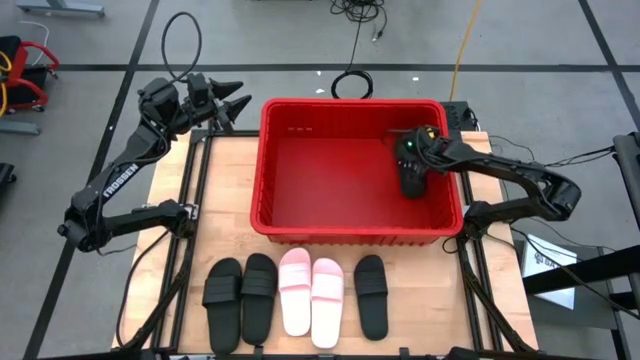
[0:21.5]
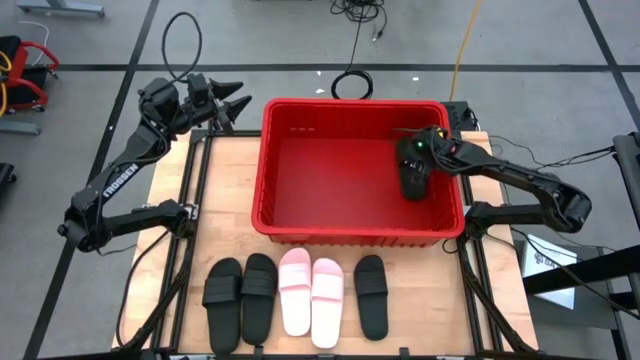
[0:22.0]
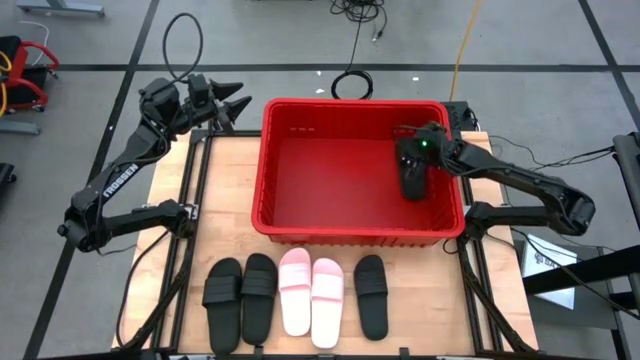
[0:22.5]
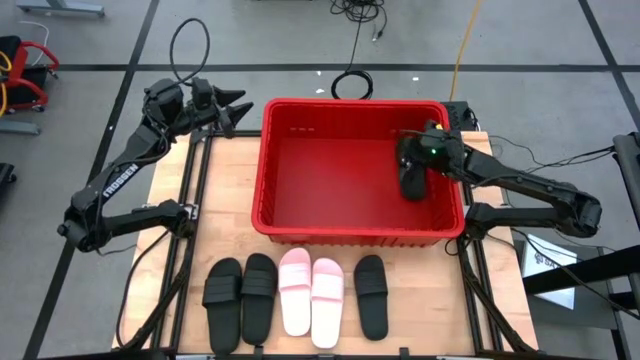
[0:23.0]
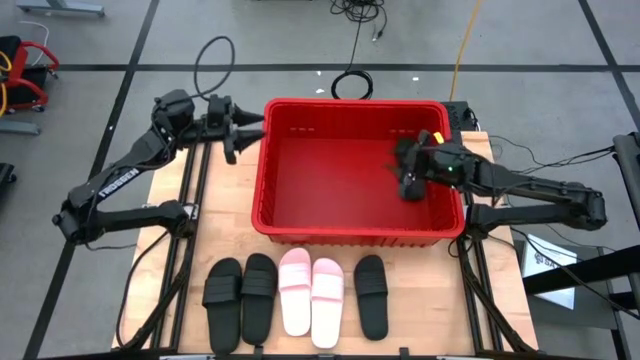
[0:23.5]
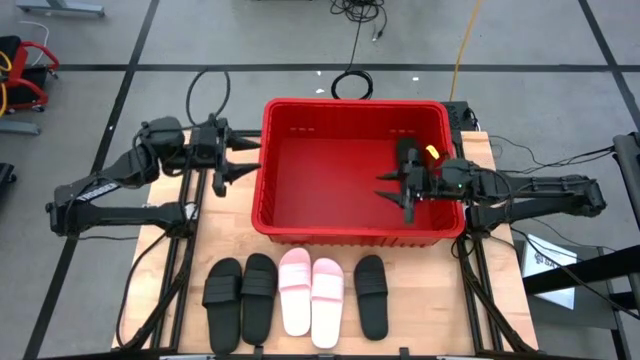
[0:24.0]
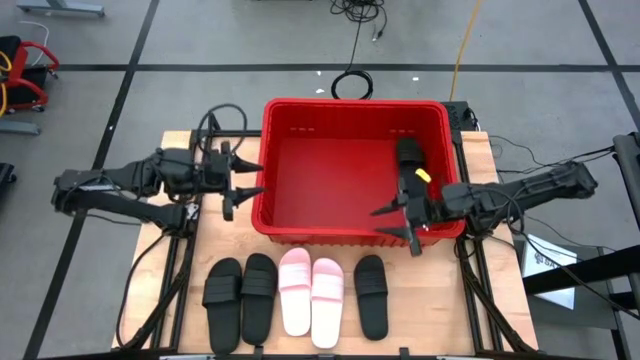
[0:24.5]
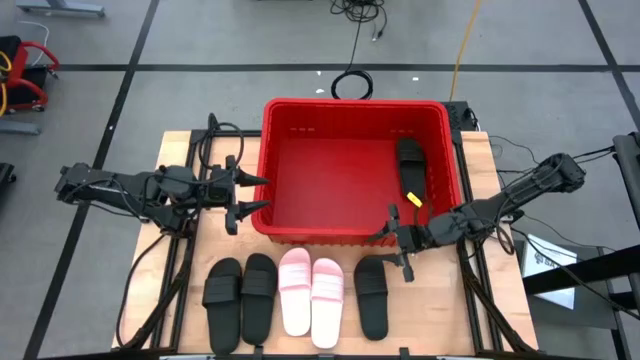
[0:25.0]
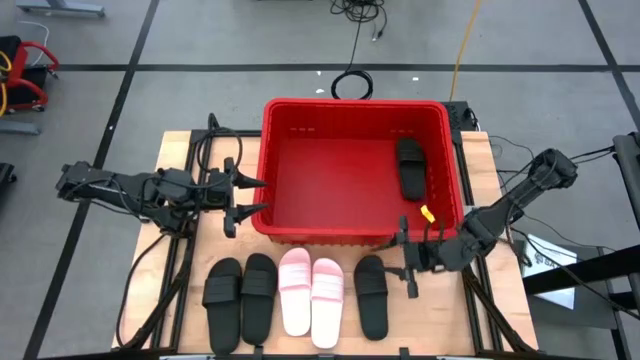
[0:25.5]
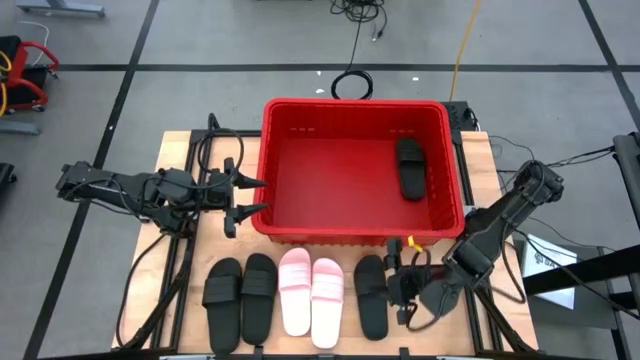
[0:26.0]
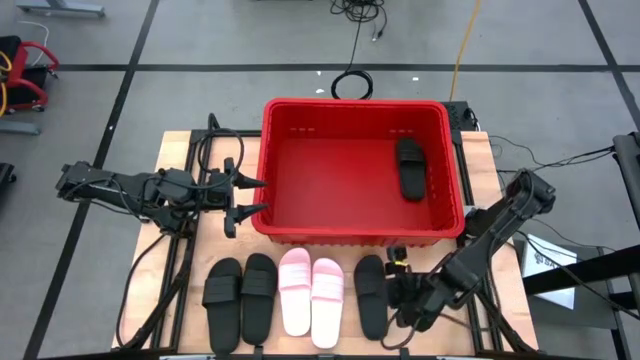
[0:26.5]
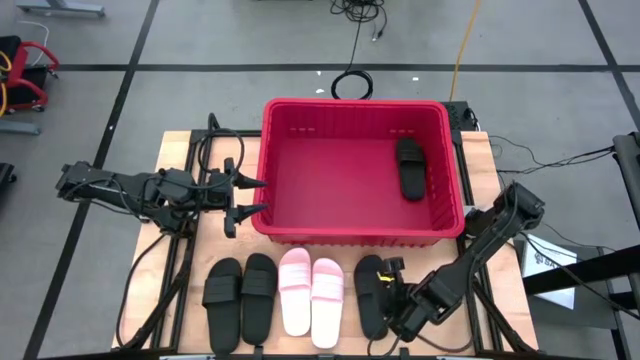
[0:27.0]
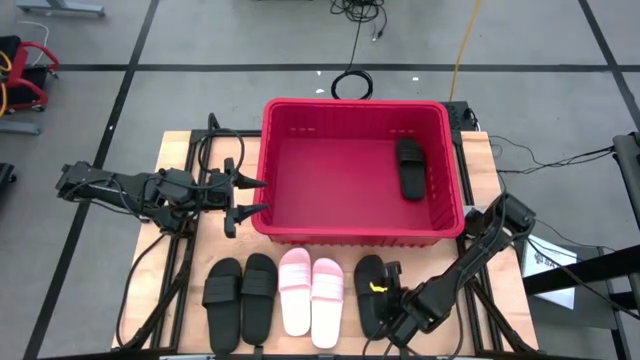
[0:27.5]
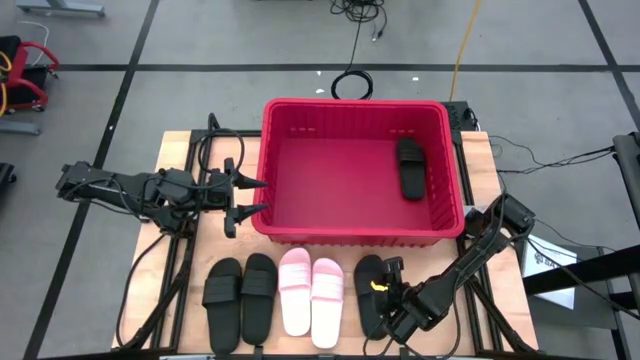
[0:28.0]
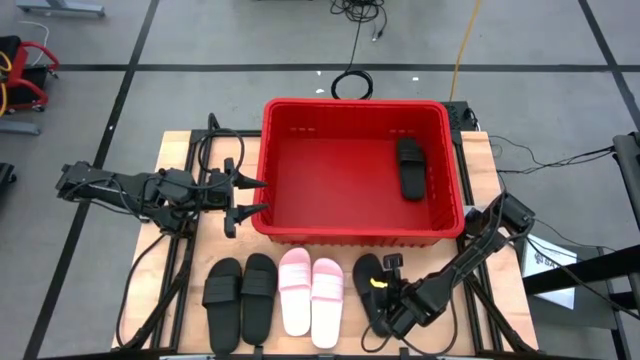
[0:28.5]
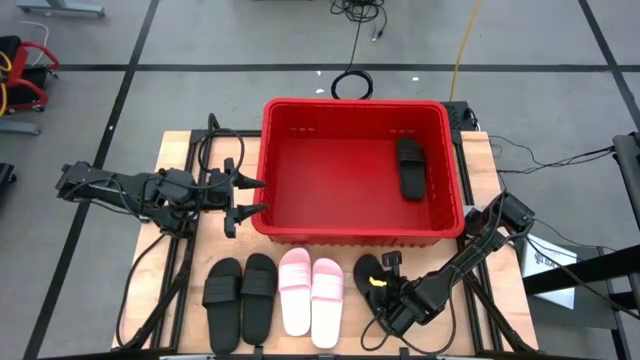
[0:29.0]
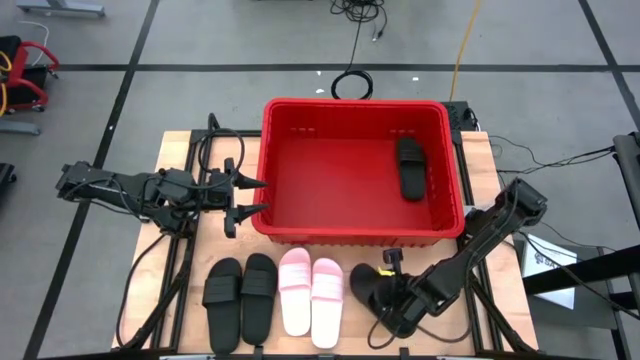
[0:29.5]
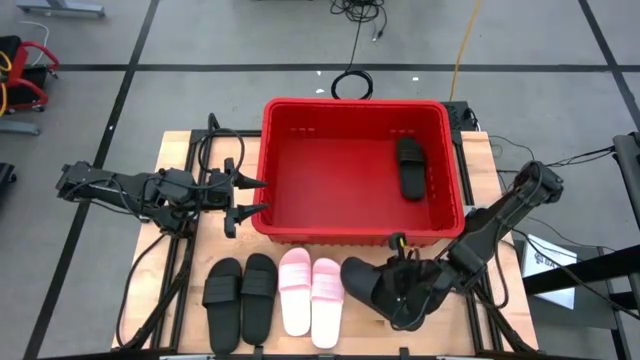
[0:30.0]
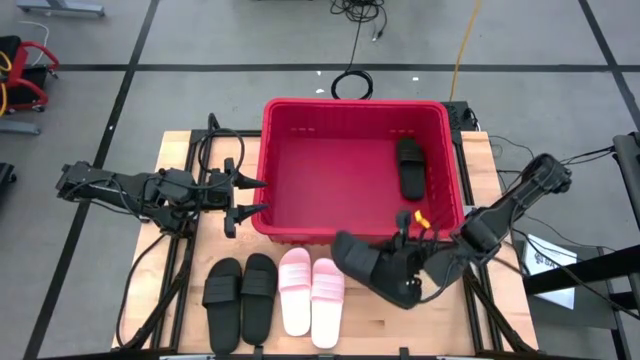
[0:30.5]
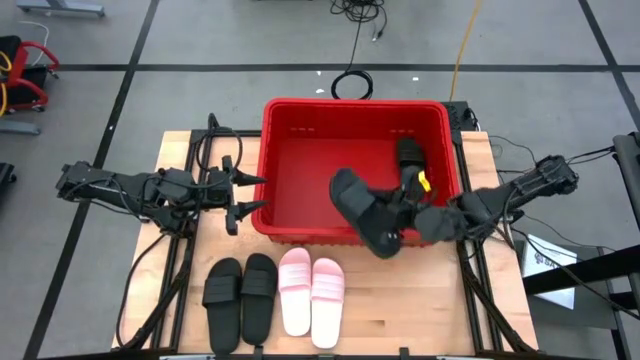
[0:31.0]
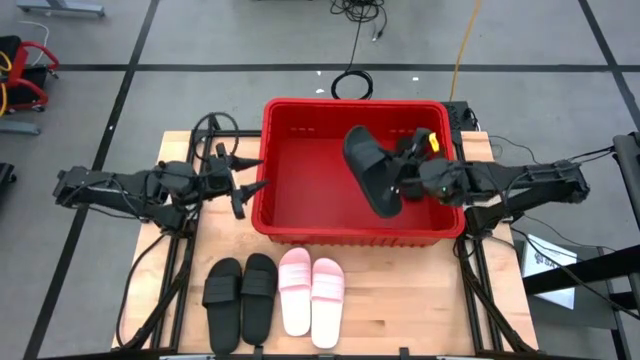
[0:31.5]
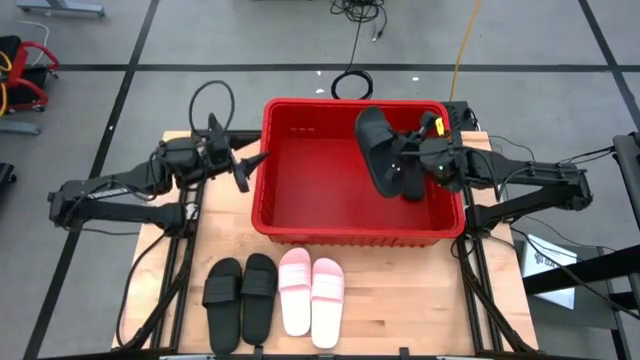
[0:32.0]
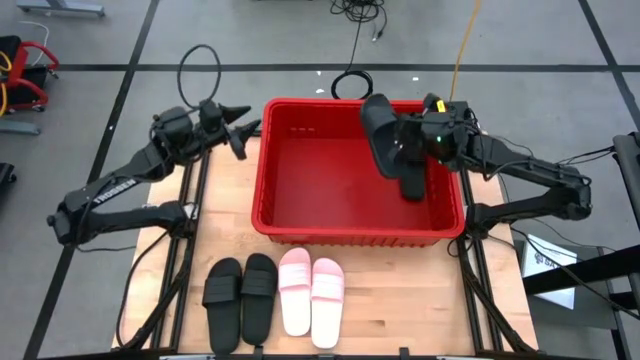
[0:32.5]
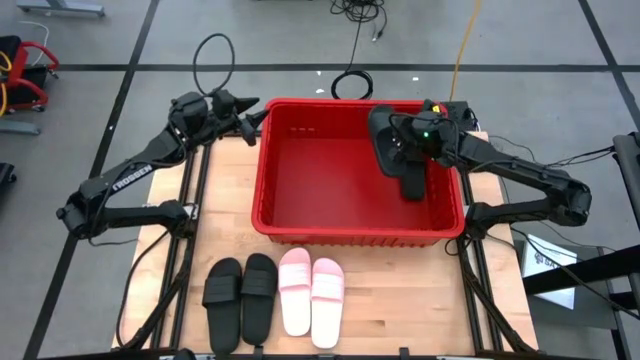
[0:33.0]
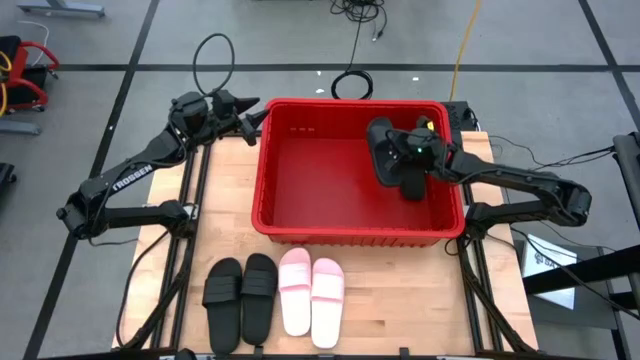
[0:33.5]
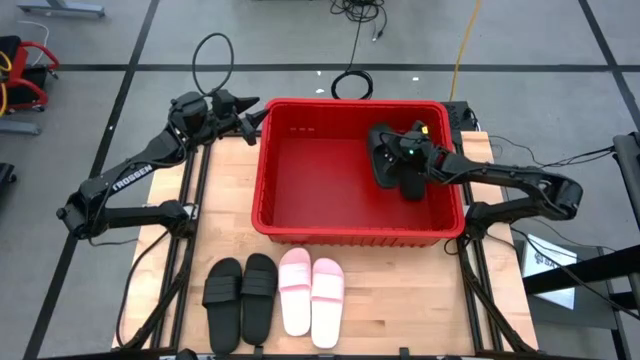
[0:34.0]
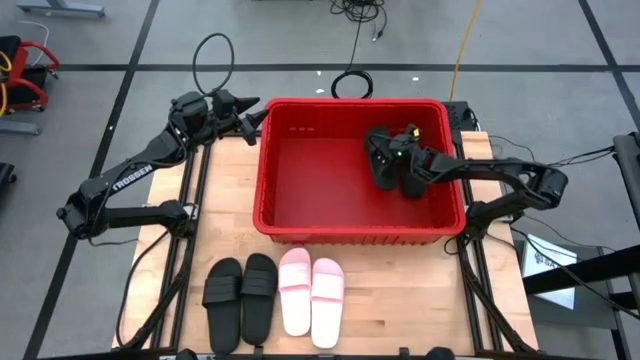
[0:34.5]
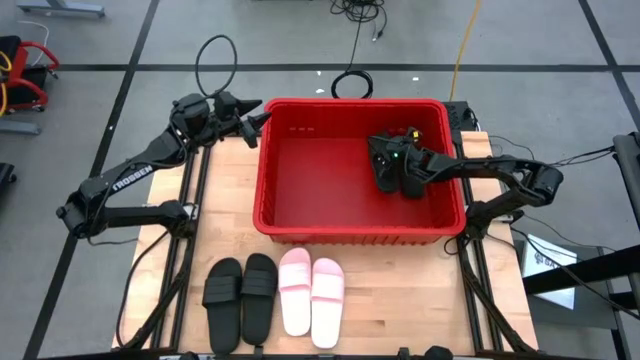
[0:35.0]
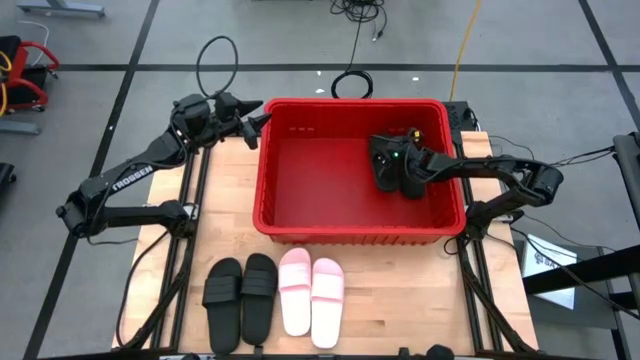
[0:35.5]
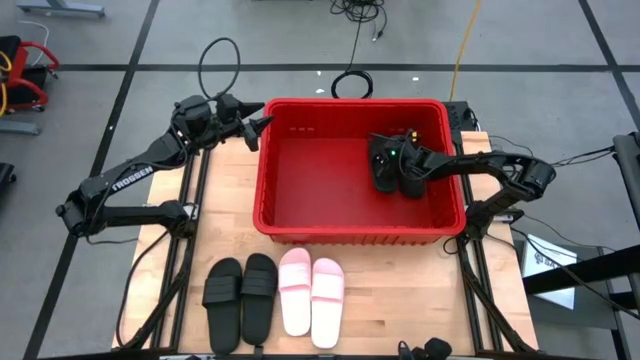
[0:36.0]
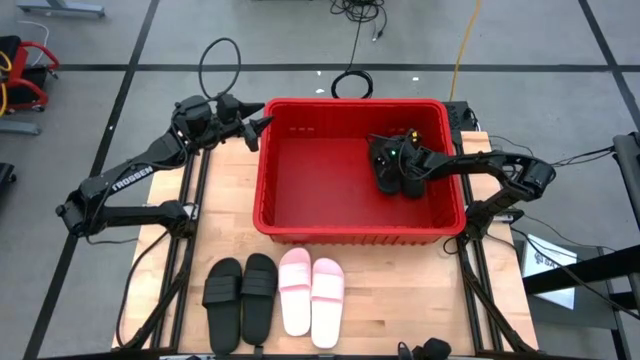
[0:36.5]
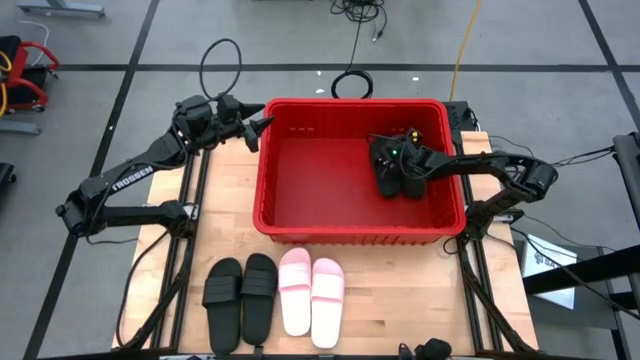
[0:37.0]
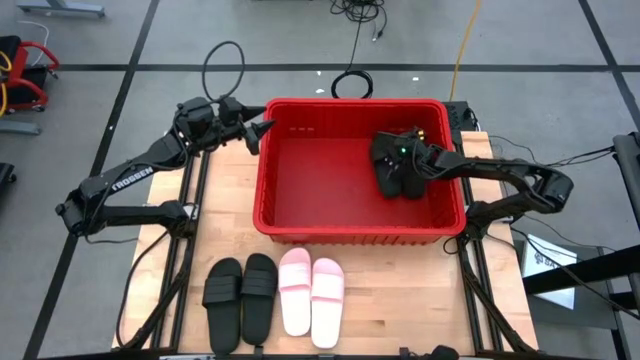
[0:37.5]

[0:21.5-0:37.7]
Task: Pick and place slides into bin
Put the black slide into the red bin

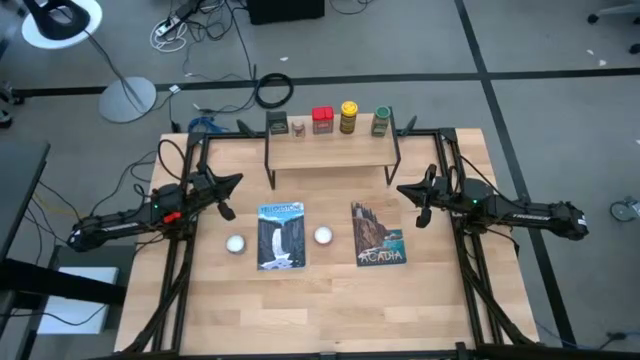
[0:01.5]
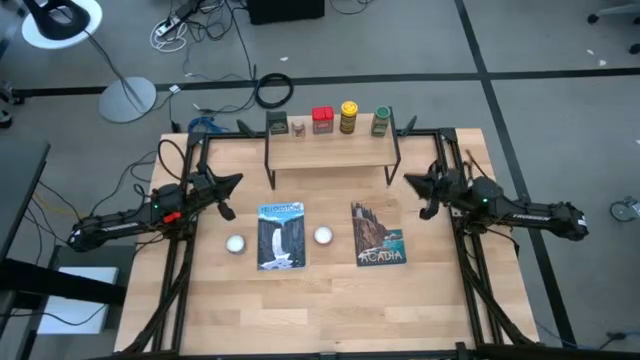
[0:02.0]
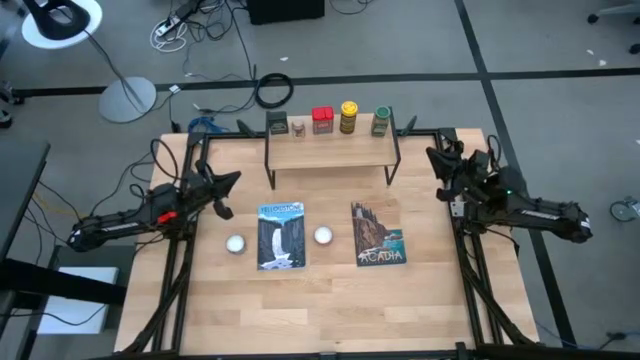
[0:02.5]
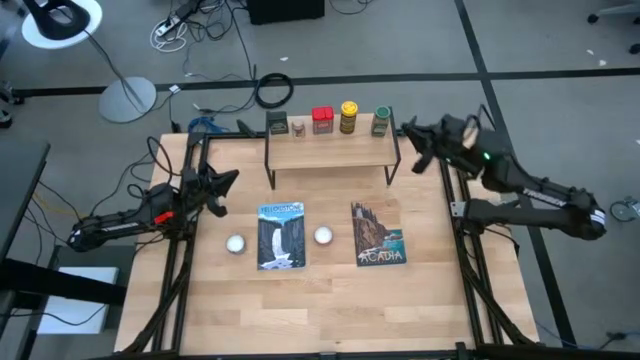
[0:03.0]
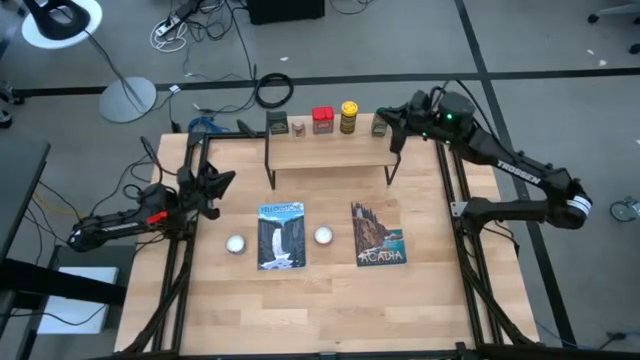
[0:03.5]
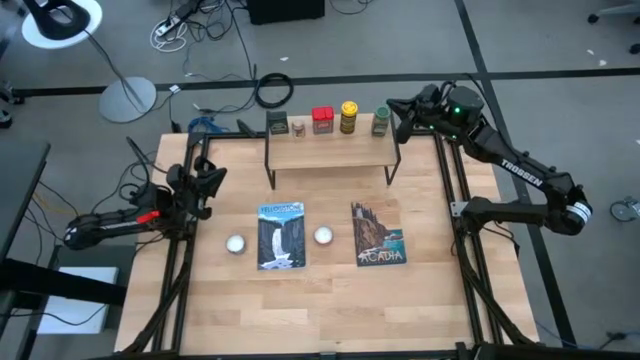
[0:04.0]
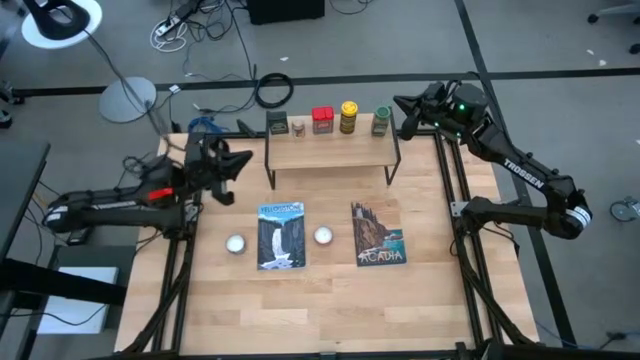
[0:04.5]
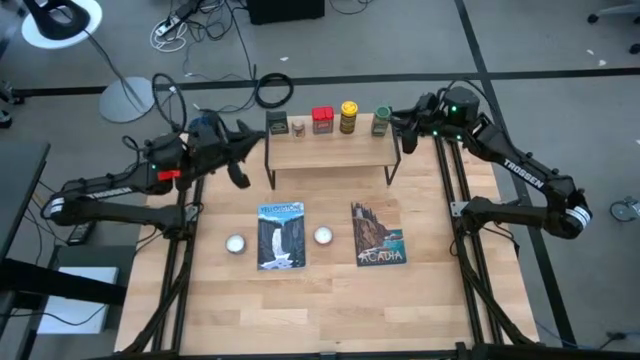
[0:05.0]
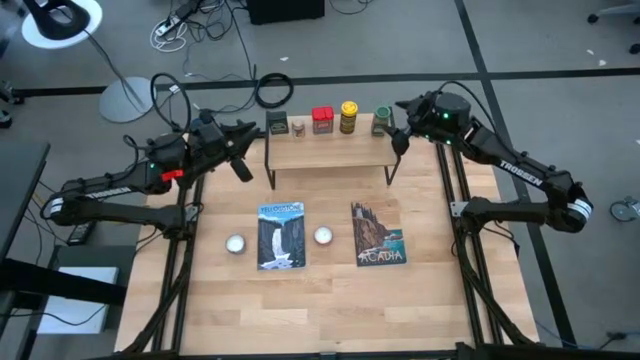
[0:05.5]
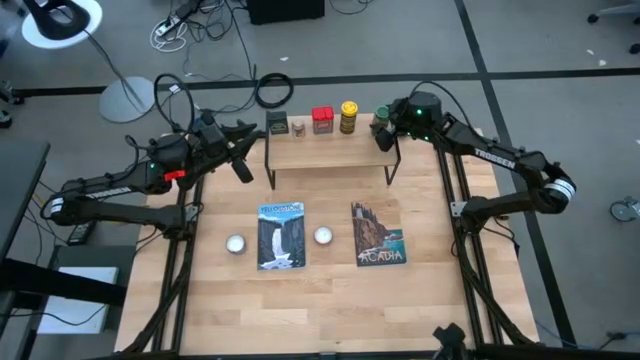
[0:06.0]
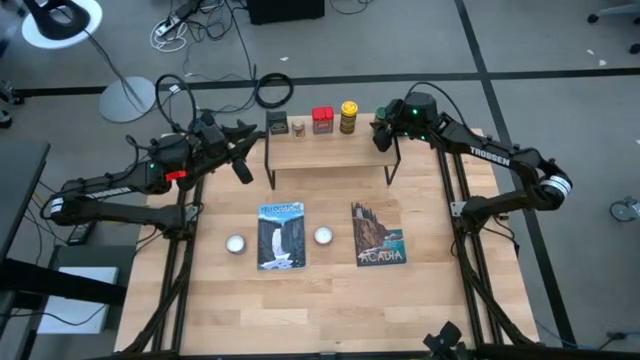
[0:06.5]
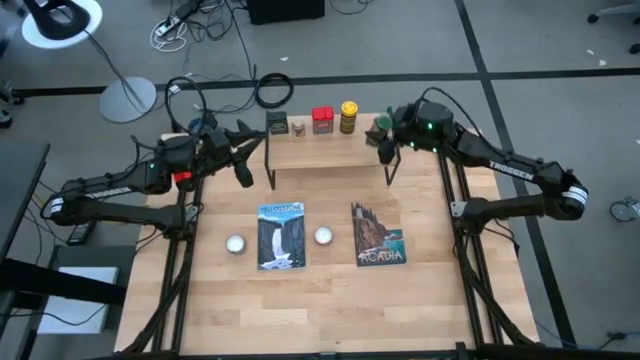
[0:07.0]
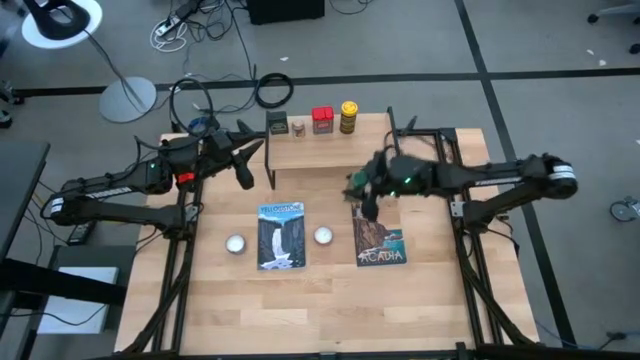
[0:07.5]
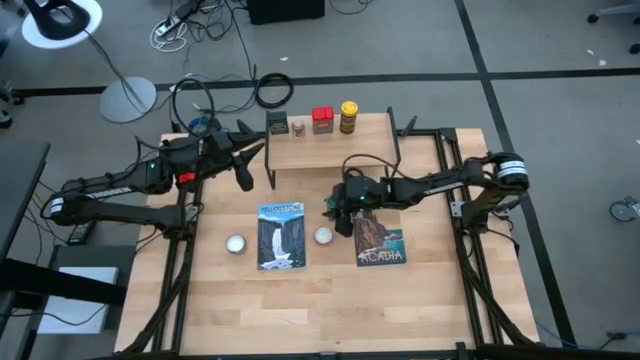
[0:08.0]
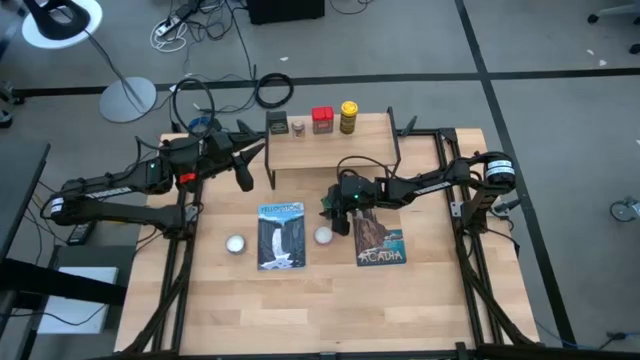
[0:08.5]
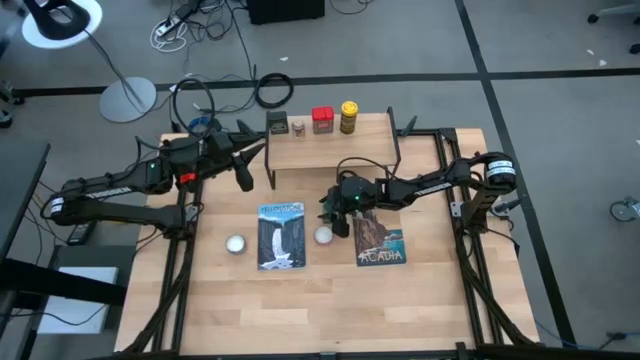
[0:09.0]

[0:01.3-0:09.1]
Task: Shelf spices
Remove the green spice from the shelf
